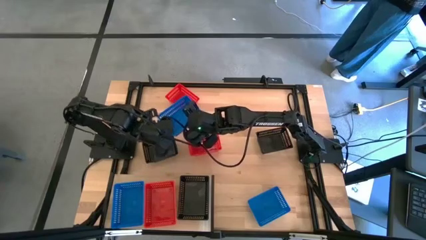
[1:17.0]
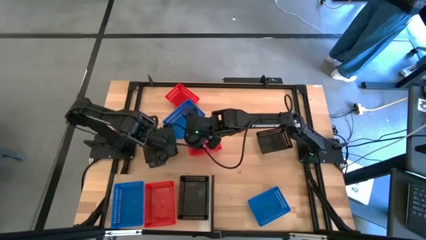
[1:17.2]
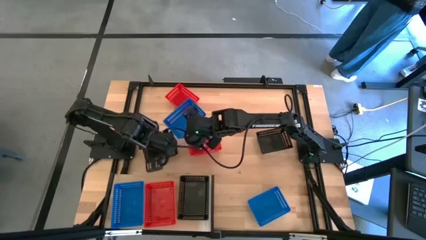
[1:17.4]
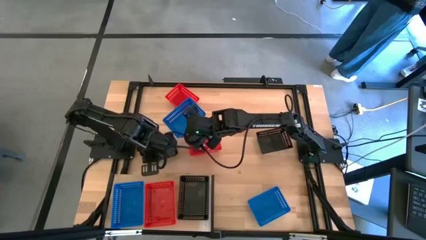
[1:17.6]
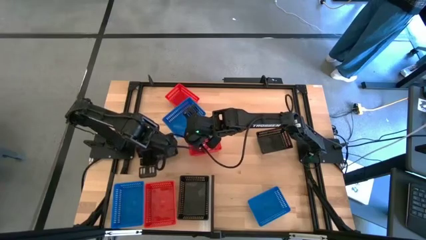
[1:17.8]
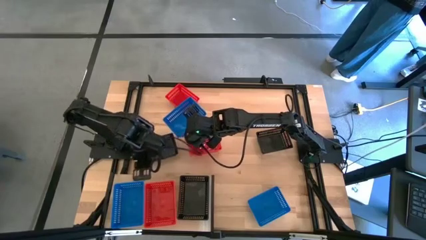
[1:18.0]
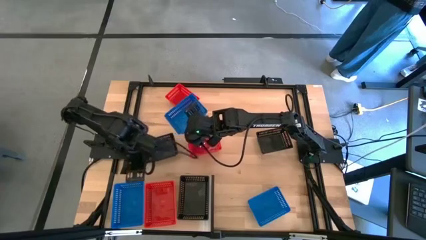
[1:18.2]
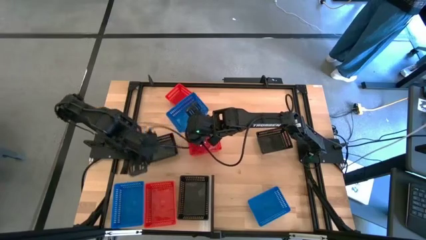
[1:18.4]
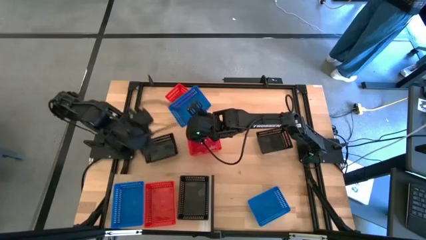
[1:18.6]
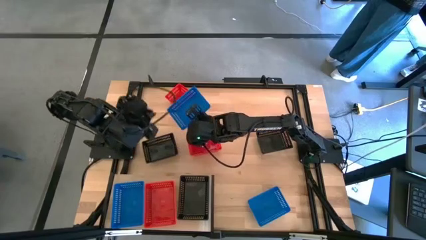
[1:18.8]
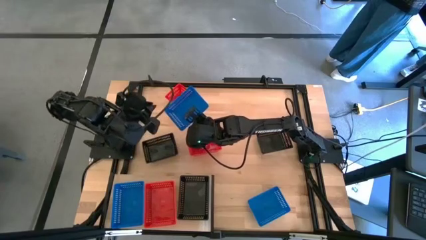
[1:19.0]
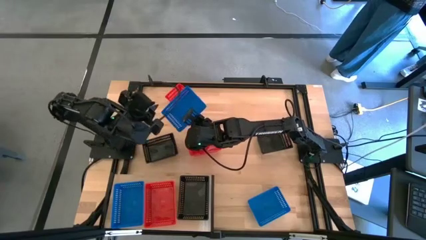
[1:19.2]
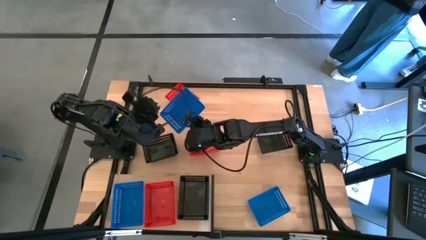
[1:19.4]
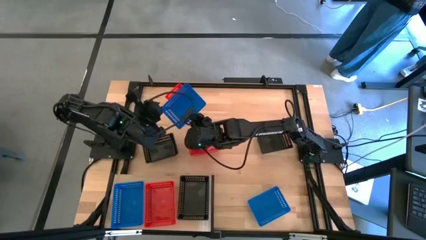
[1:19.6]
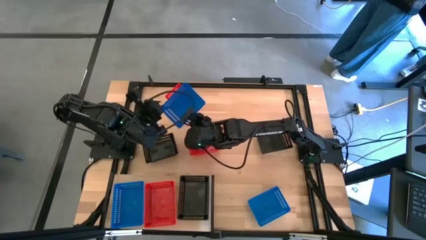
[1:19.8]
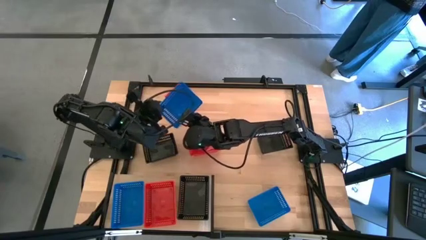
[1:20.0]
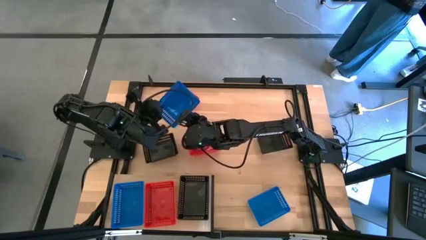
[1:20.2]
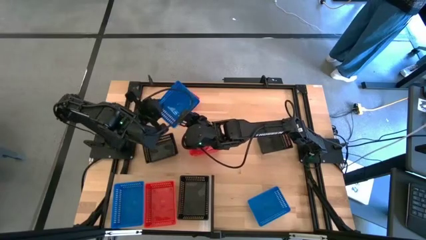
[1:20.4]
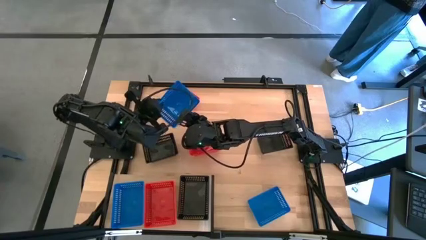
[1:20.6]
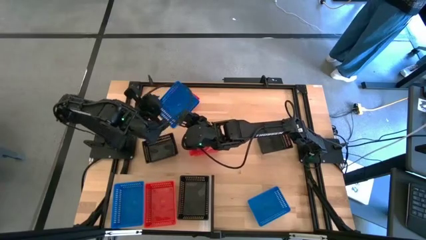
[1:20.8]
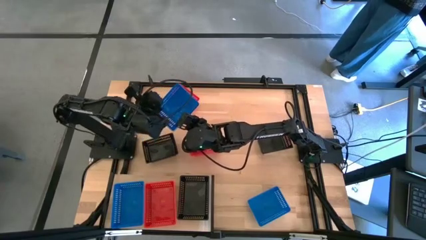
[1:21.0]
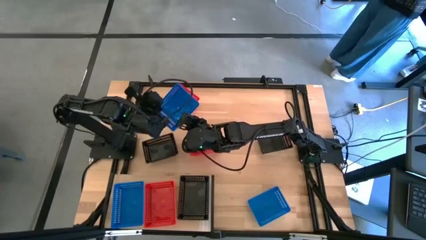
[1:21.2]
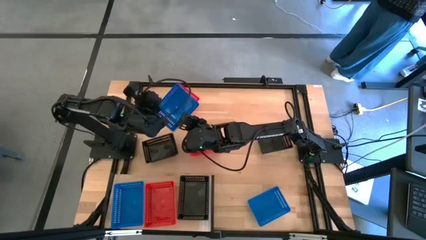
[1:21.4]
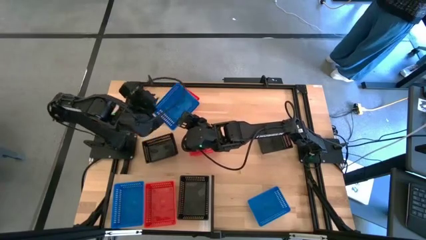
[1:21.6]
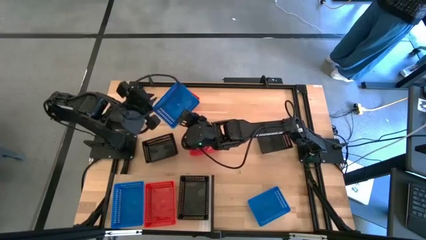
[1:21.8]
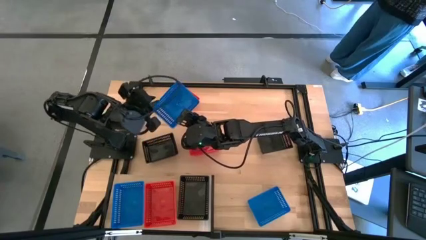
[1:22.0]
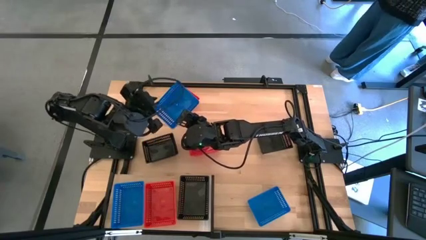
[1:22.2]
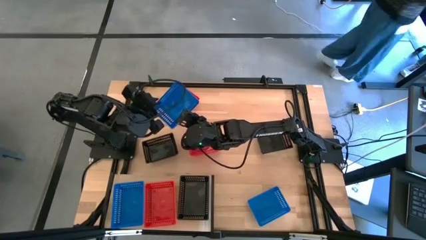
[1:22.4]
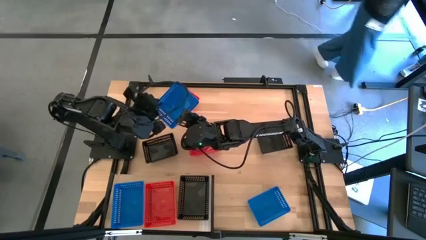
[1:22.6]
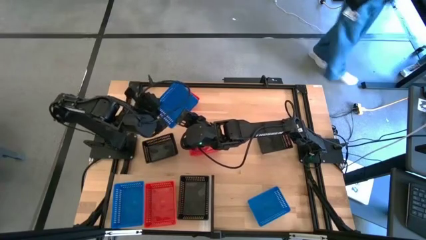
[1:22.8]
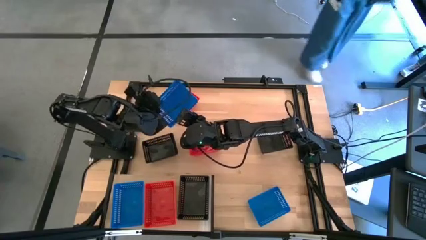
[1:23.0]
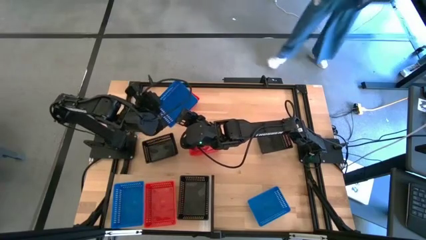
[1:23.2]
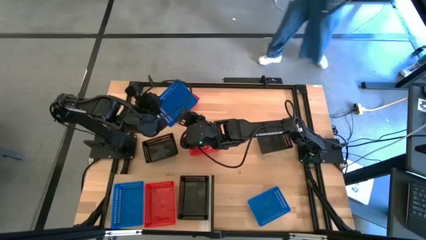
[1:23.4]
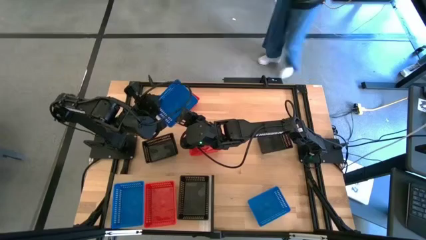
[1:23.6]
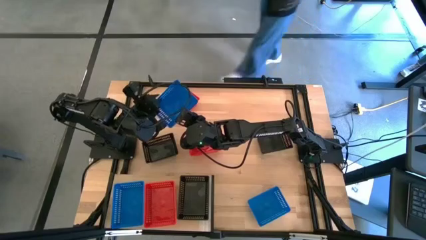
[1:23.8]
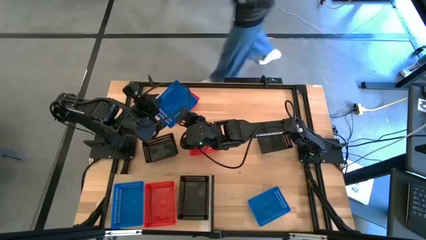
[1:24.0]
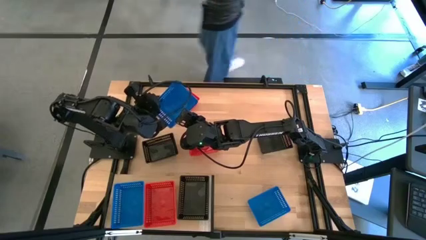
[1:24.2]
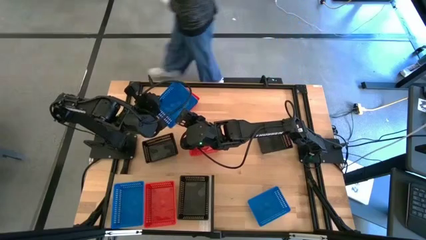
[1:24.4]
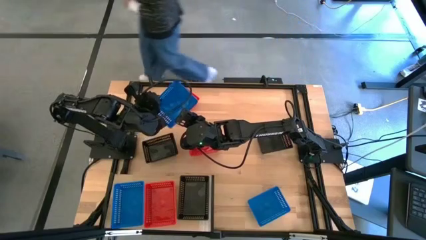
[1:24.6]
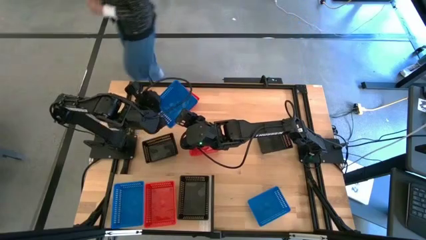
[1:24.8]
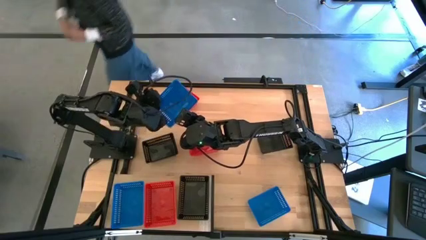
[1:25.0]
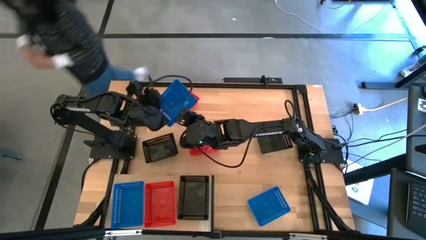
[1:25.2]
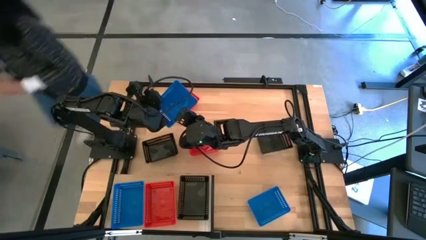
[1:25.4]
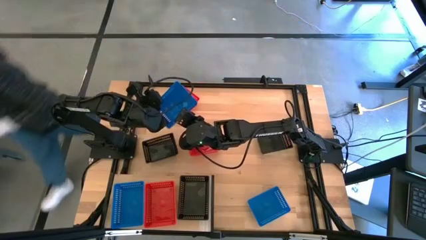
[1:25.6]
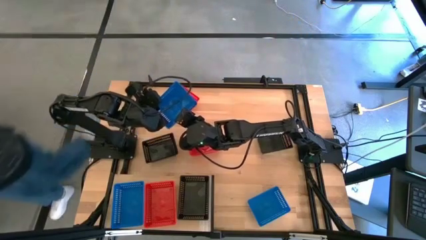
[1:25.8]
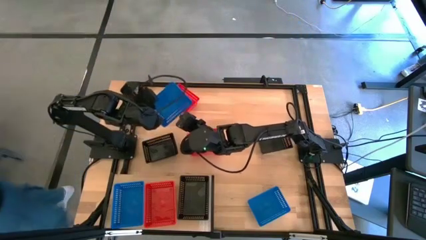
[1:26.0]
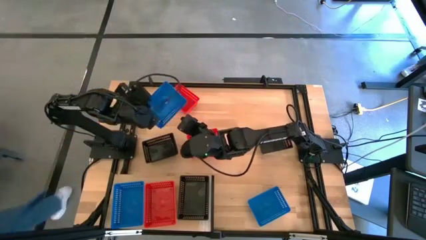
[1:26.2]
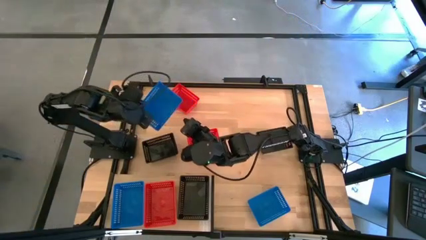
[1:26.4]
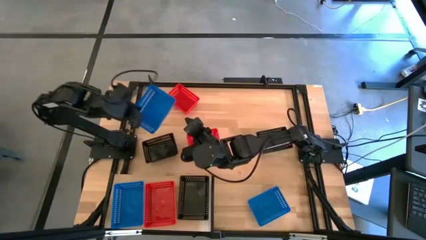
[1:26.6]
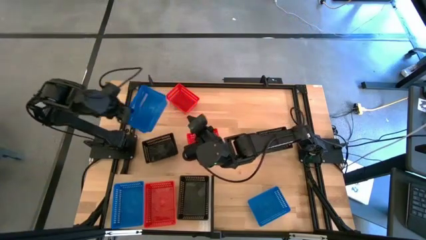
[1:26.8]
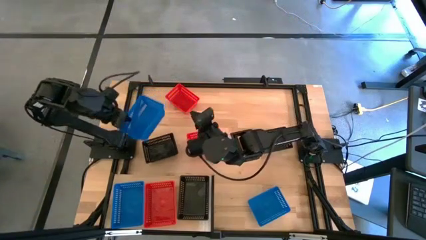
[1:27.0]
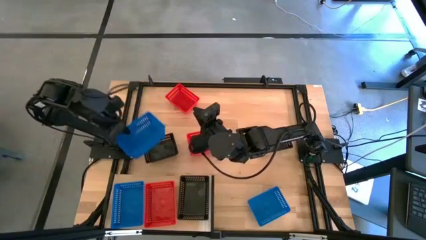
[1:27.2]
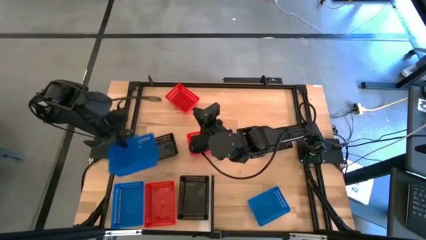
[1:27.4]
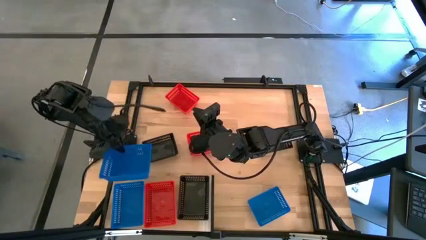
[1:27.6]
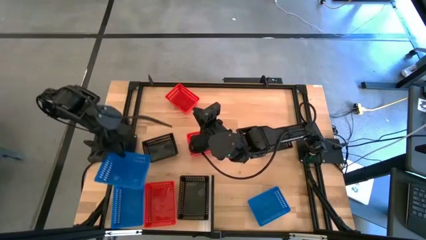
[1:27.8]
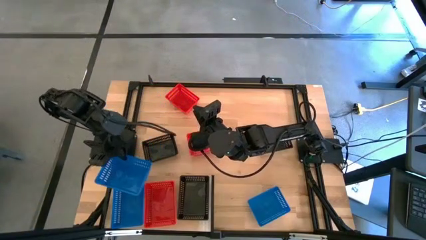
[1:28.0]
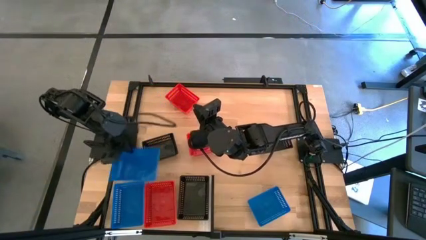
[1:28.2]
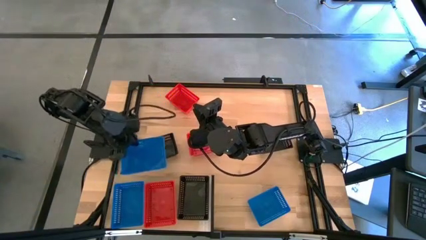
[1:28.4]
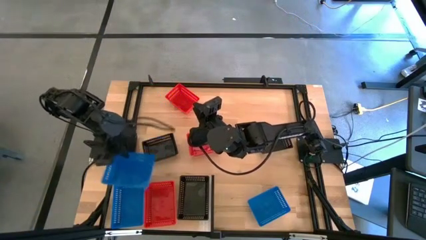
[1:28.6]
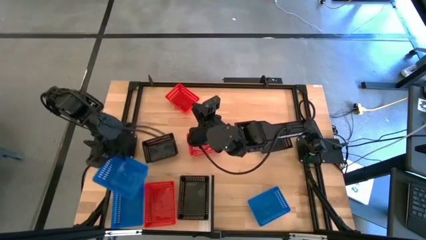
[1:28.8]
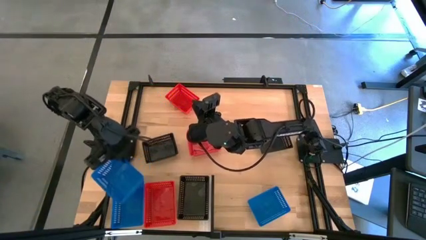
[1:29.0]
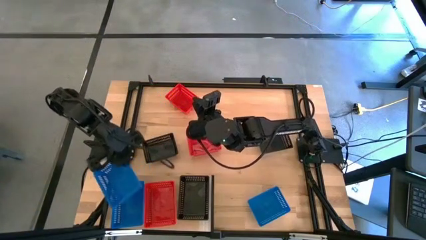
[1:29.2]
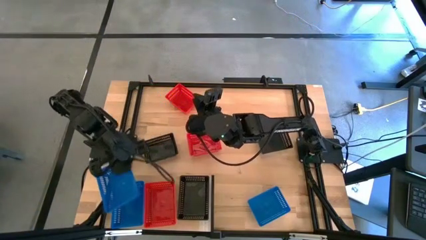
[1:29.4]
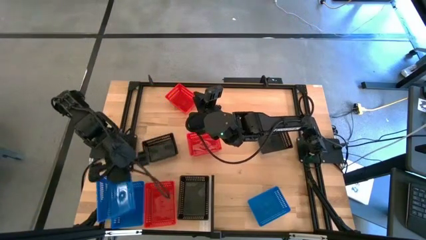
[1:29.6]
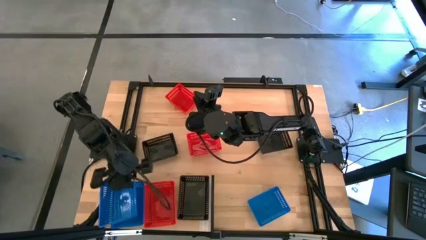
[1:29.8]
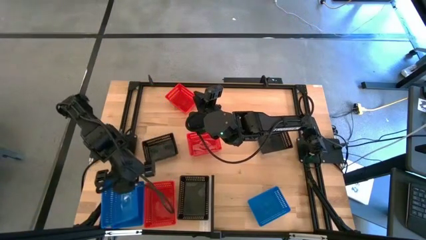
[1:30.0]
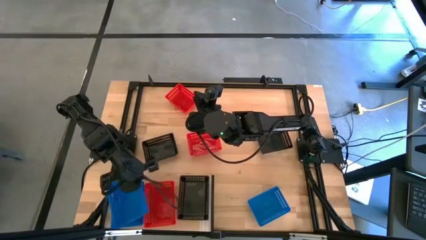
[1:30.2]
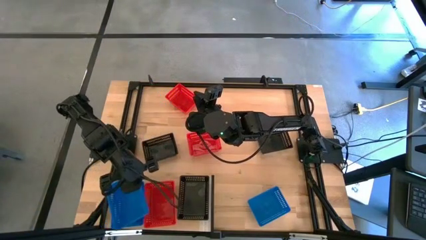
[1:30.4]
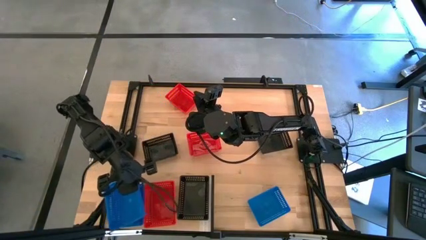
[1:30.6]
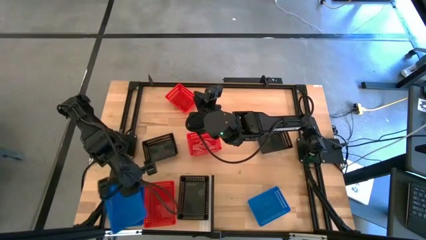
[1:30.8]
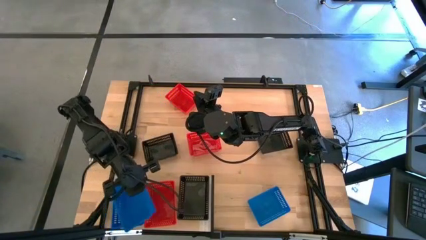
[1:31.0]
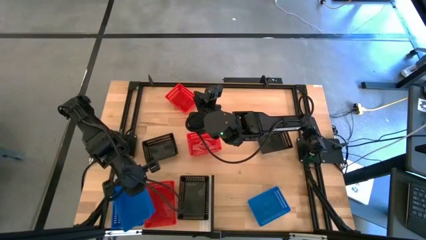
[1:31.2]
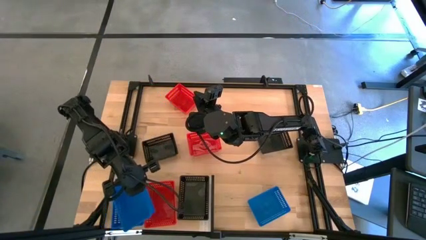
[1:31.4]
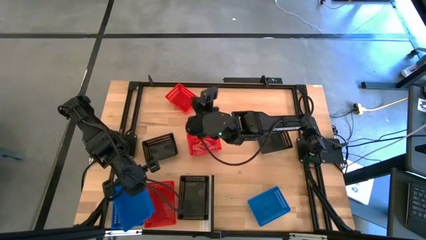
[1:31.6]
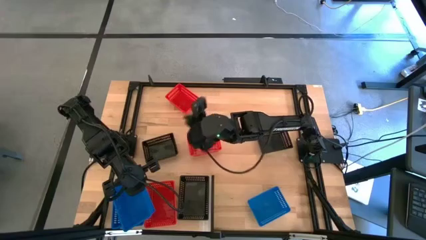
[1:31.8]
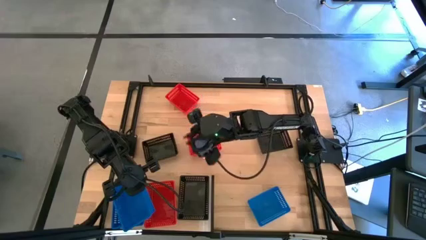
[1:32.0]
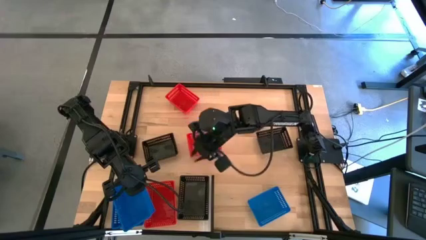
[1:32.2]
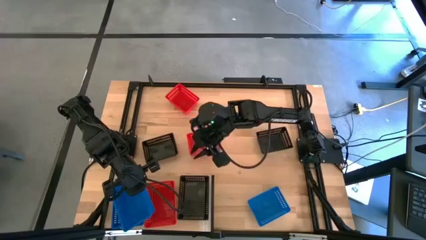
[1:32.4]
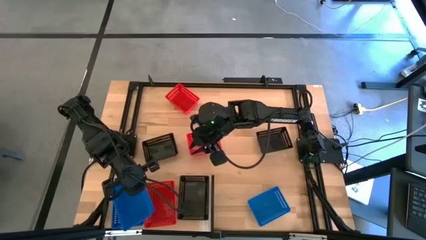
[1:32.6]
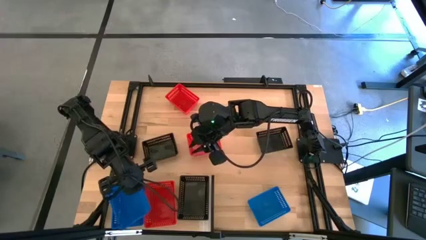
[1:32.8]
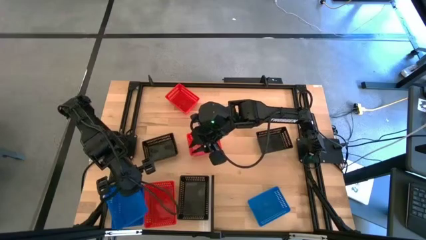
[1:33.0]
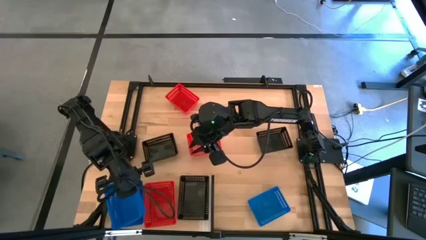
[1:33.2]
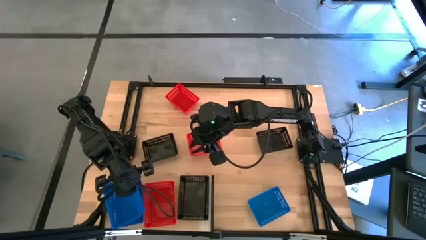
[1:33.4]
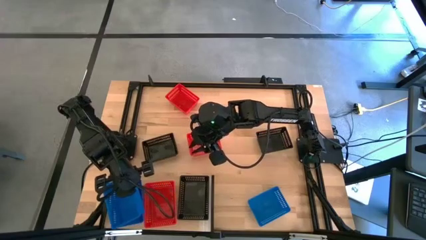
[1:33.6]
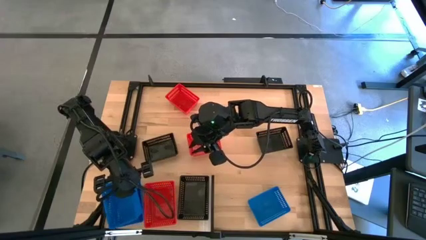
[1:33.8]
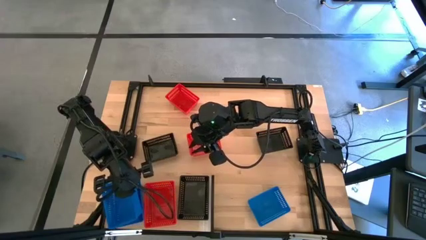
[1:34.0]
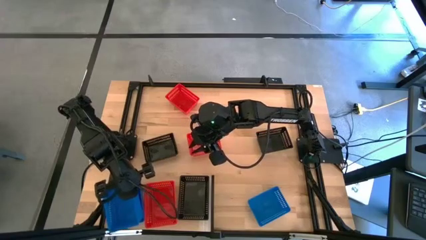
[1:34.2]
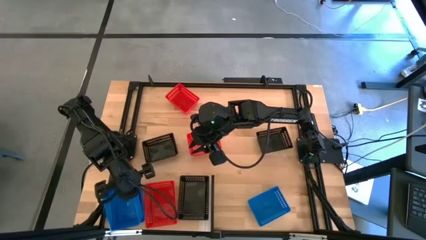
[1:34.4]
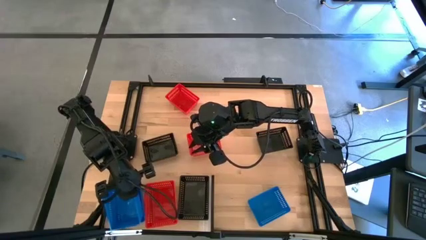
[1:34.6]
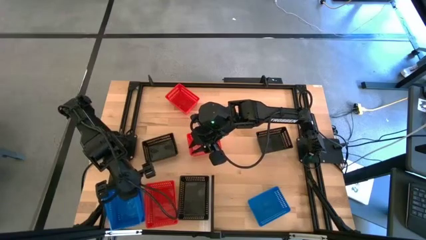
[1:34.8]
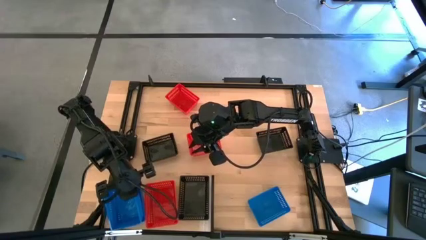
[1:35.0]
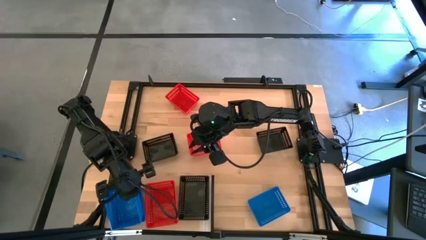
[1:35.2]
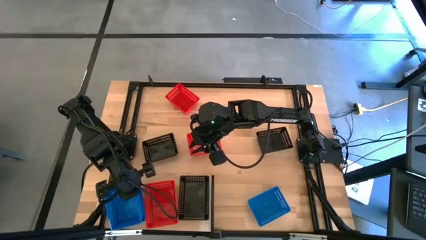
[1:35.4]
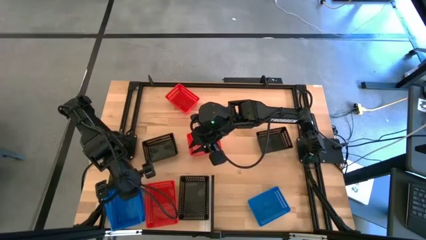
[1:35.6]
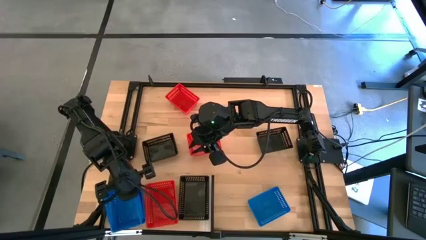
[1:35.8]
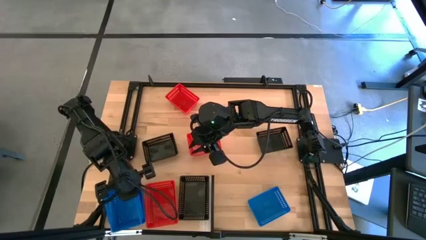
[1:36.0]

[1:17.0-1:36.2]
Task: Stack baskets on shelf by color
Stack the left blue bin on top of the other blue bin on the shelf
